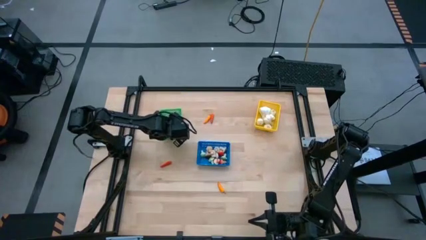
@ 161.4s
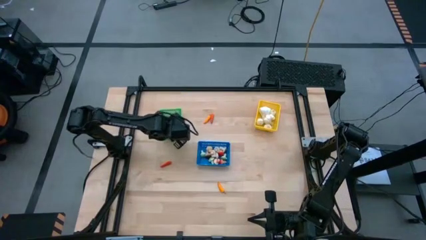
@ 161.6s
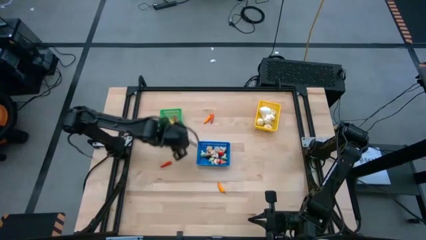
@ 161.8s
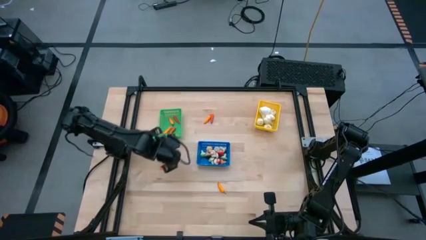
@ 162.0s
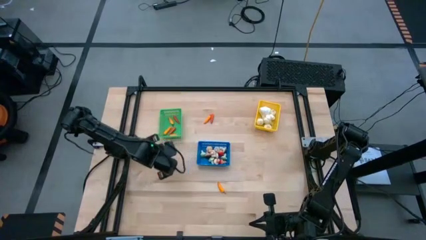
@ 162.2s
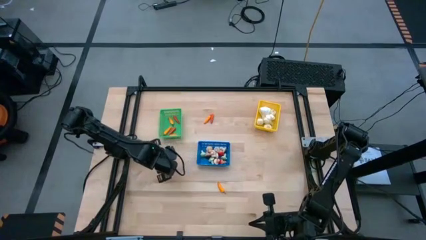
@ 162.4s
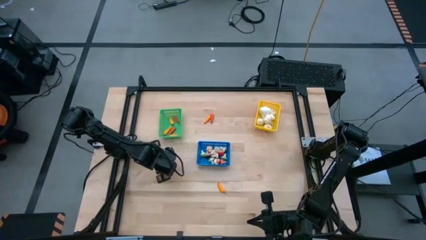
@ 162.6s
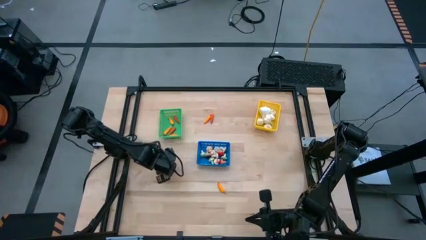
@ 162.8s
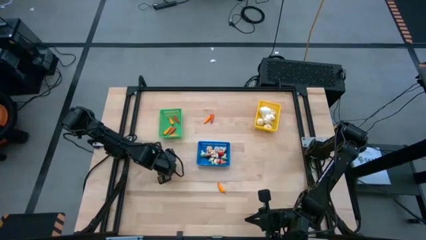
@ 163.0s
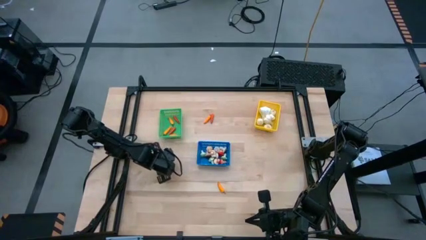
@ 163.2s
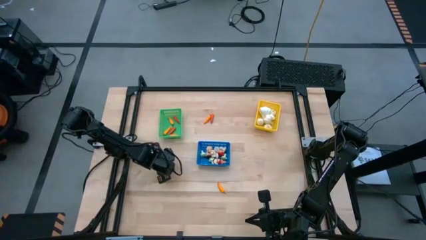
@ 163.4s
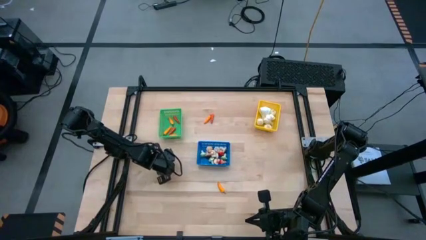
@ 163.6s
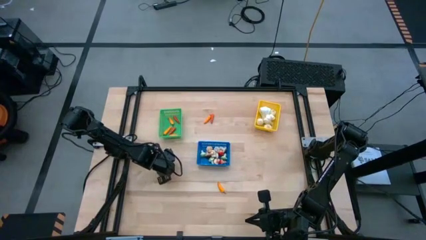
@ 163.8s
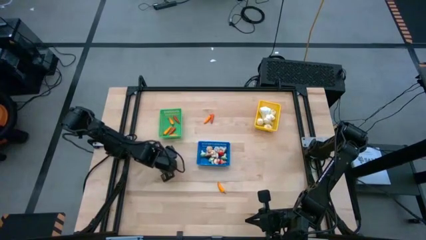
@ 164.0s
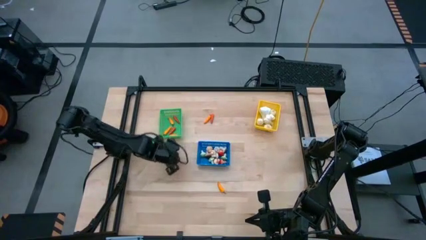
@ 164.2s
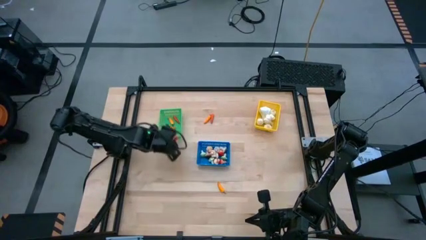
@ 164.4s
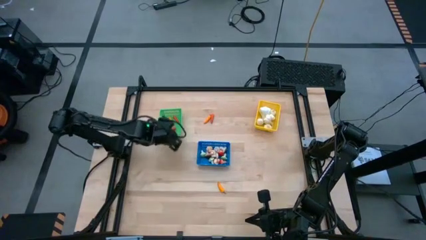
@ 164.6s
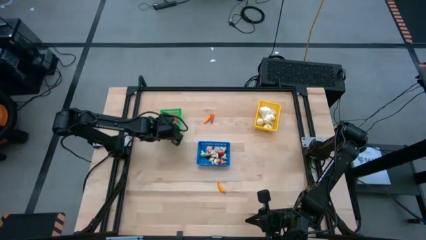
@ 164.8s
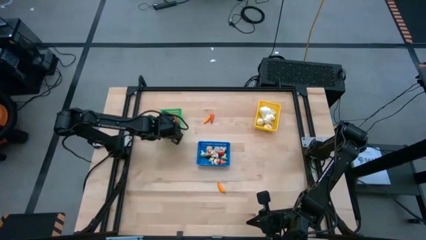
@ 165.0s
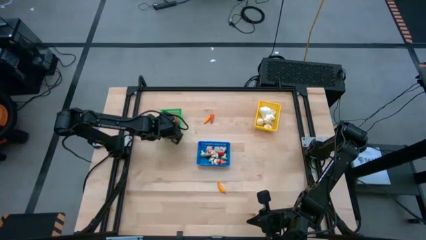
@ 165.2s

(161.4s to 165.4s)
Task: Sort produce into baskets
Put the carrot into the green bin

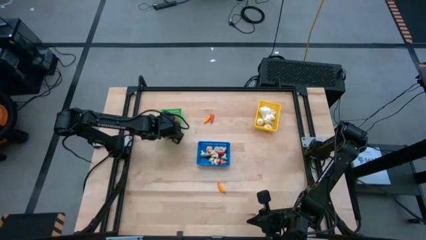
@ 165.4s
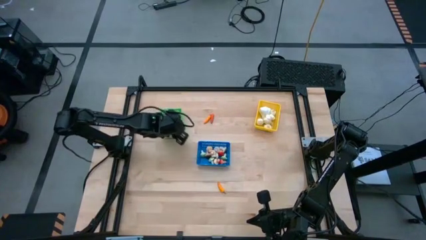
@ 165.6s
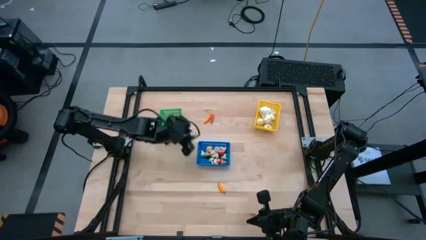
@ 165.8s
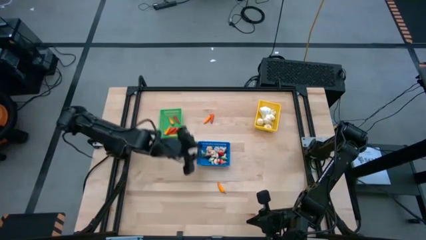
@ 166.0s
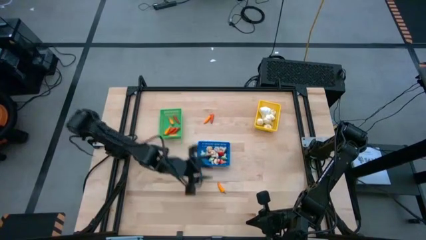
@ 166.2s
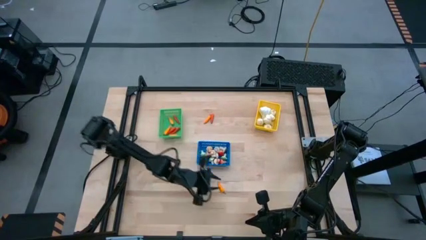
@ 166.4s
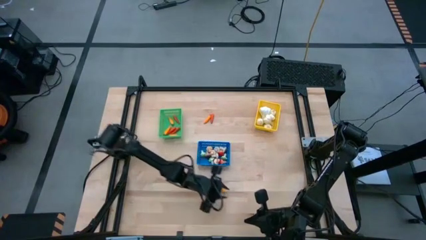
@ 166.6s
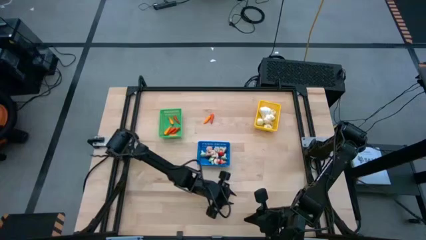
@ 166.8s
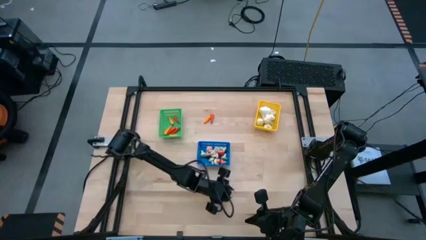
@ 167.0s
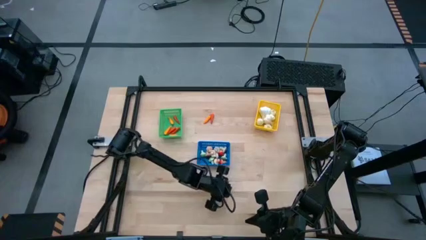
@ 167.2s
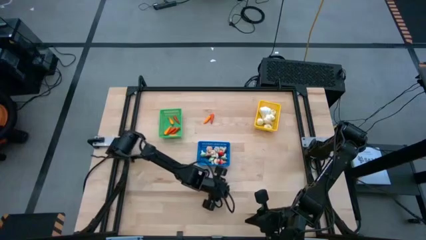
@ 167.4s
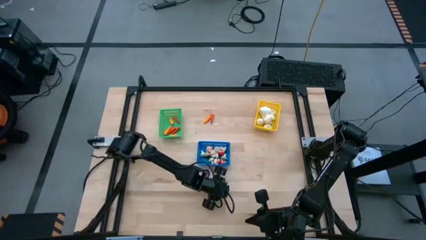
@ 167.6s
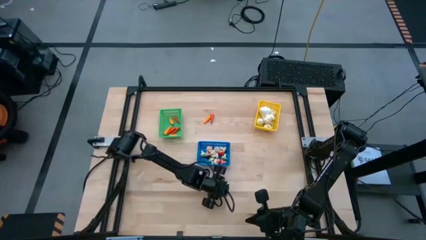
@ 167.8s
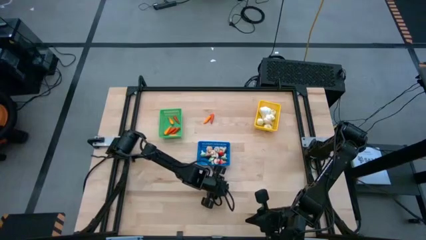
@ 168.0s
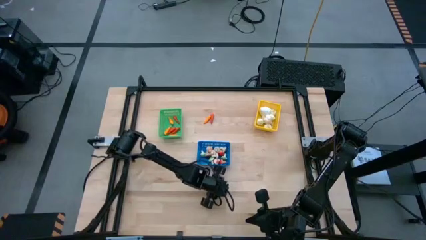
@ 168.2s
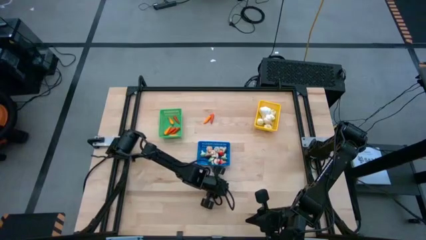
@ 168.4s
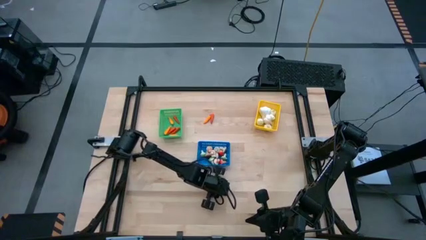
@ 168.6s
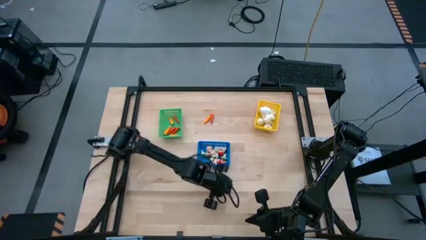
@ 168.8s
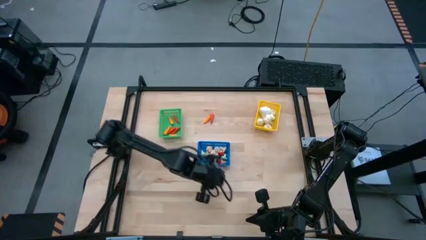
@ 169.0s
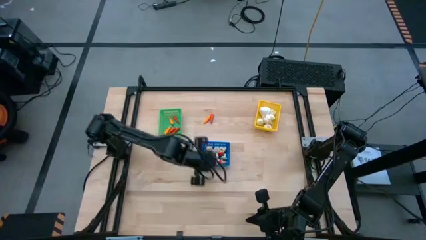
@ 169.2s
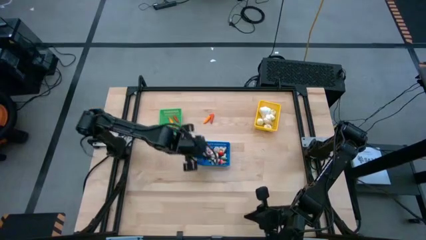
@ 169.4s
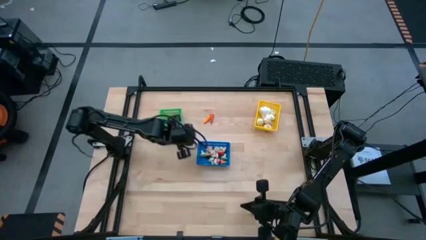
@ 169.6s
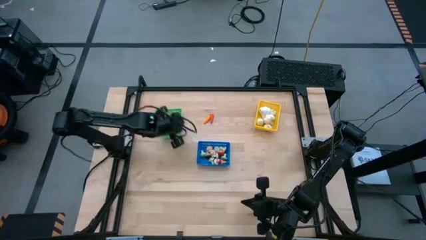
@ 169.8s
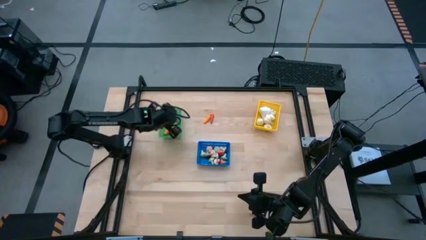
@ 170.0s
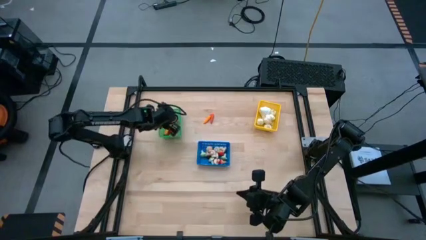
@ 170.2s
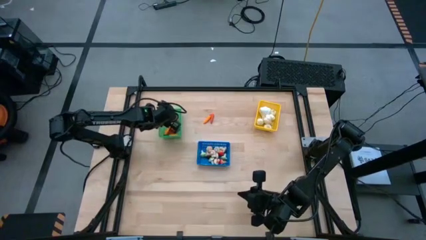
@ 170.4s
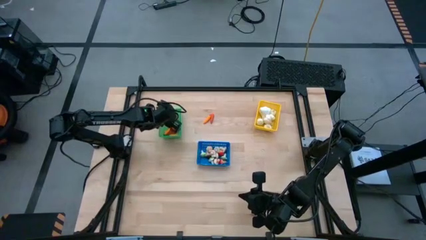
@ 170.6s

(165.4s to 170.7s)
Put the yellow chili pepper into the green bin

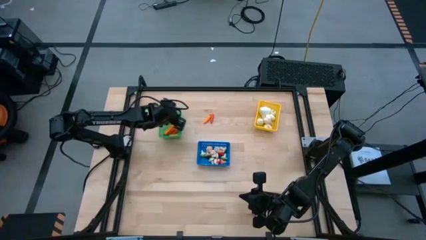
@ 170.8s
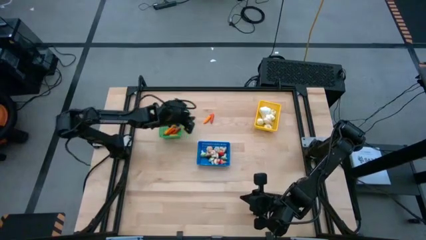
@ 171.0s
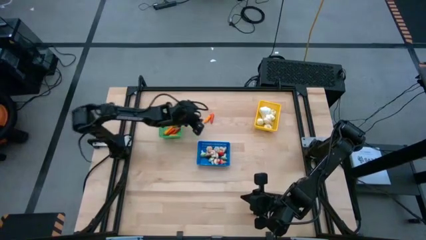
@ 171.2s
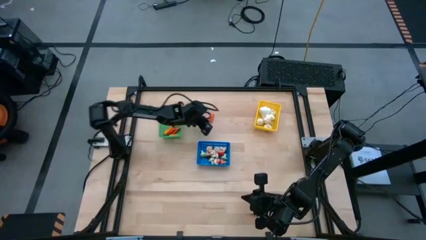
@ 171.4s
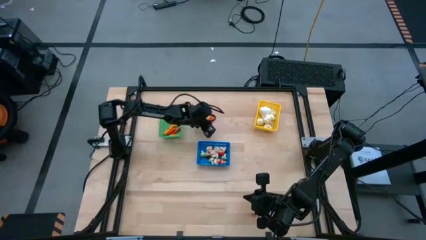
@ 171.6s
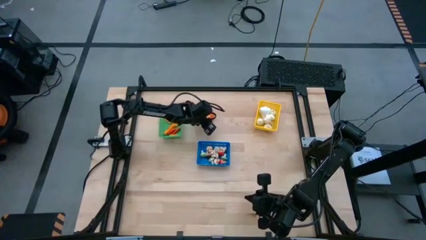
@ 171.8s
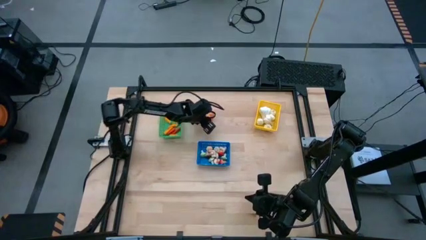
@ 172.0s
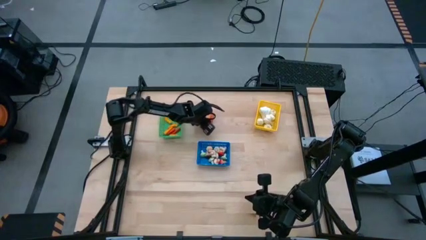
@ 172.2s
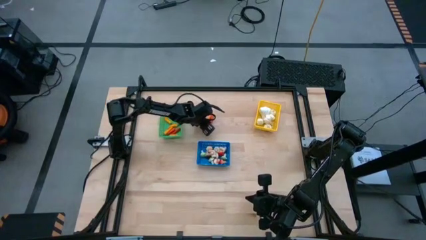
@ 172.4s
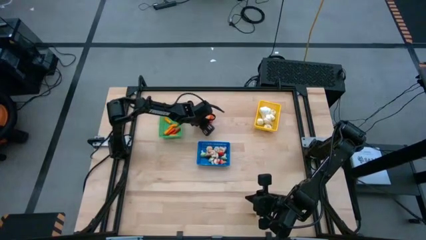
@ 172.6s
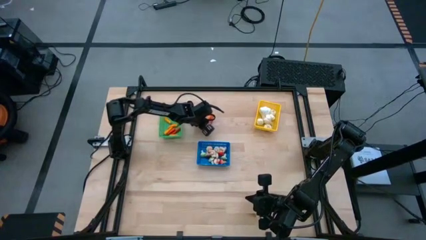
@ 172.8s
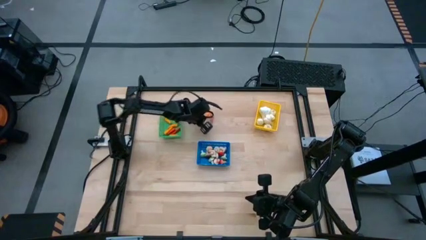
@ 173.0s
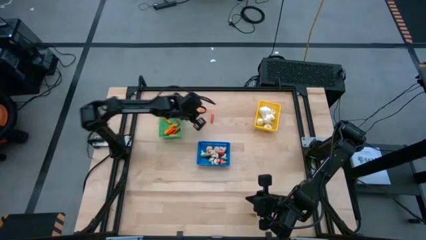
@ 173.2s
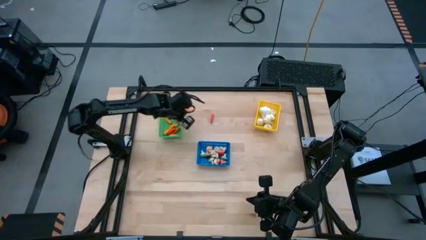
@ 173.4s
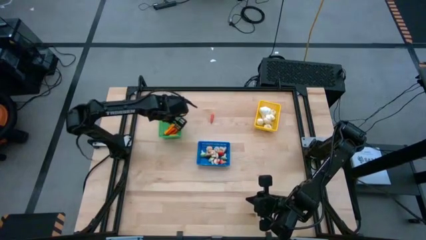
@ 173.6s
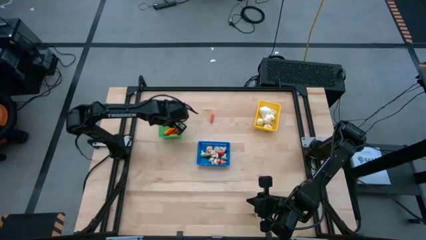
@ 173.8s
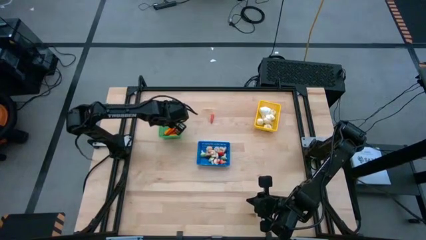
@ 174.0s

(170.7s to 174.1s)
Put the yellow chili pepper into the green bin

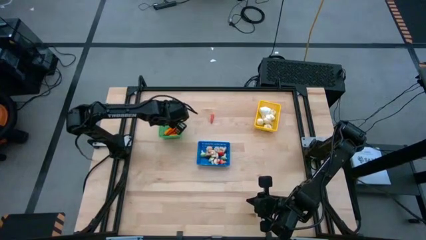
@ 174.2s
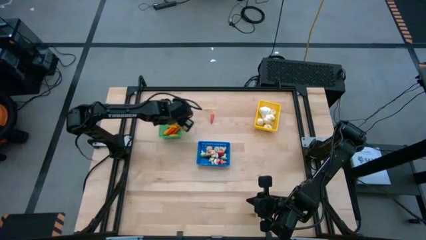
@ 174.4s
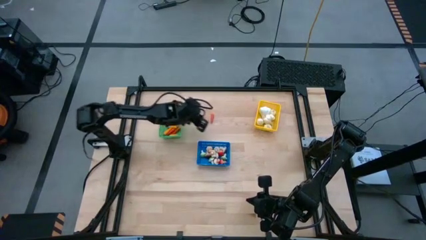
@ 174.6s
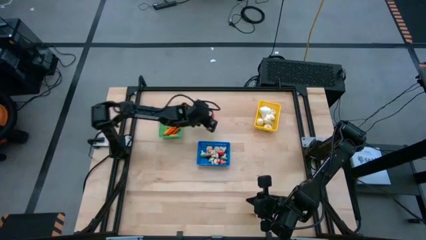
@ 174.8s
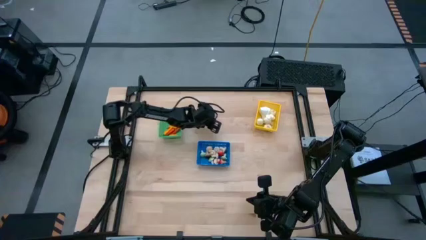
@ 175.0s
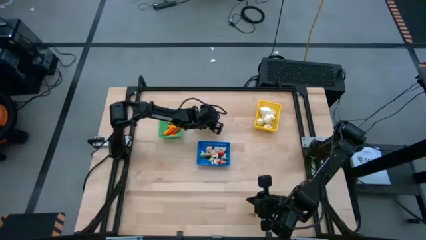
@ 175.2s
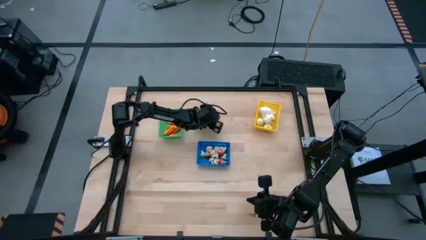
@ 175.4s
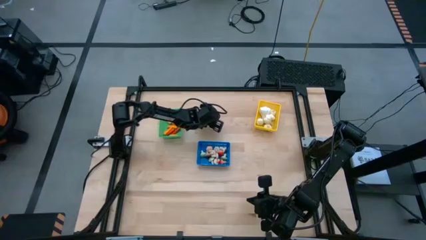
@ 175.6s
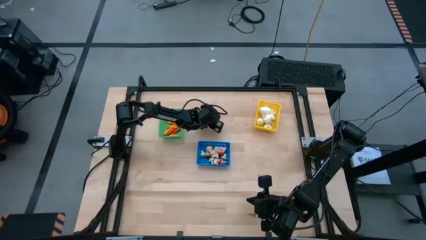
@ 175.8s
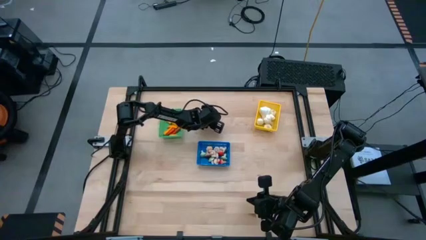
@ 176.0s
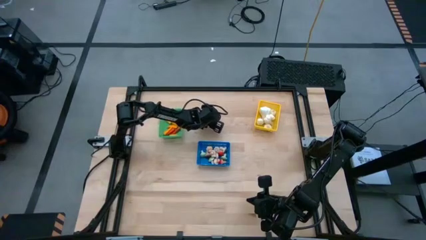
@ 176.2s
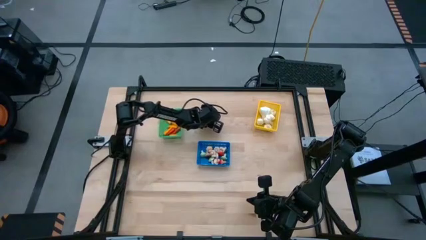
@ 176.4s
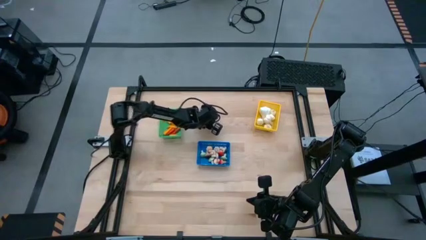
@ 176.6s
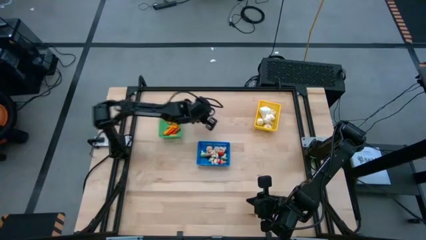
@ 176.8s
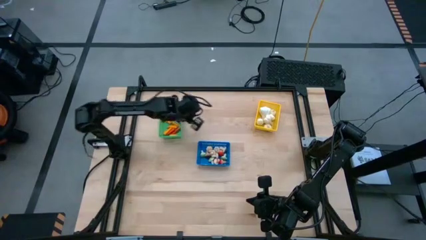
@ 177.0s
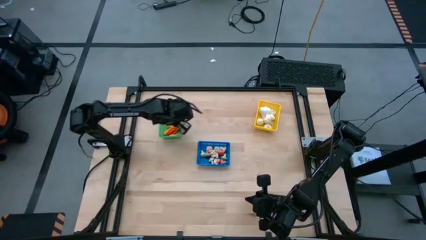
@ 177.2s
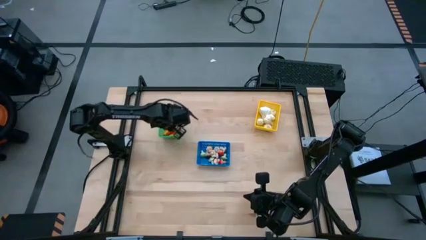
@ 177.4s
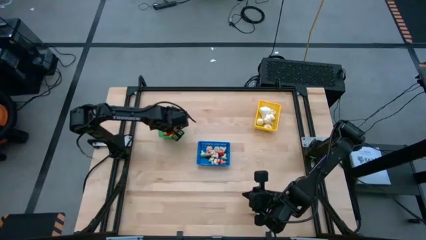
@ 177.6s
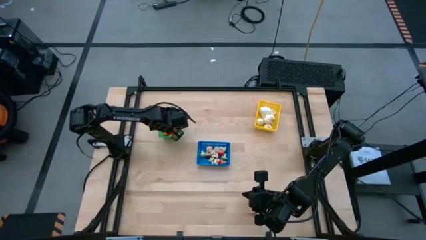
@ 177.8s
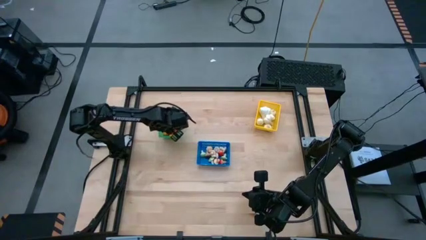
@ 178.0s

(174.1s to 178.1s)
Put the chili pepper into the green bin
